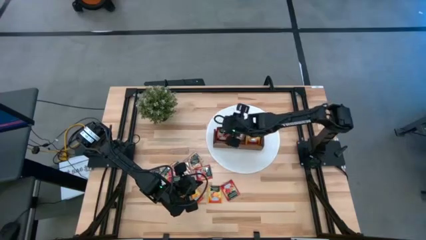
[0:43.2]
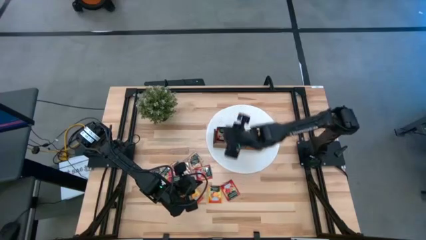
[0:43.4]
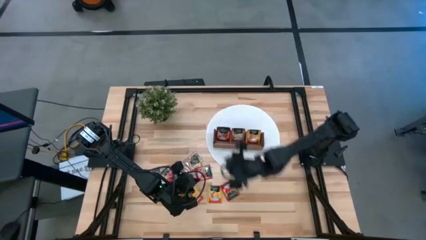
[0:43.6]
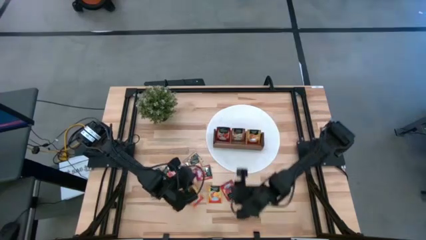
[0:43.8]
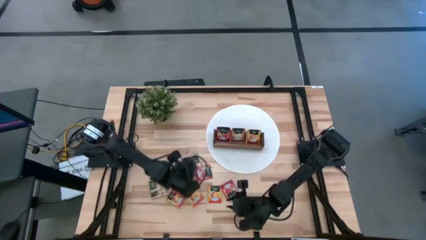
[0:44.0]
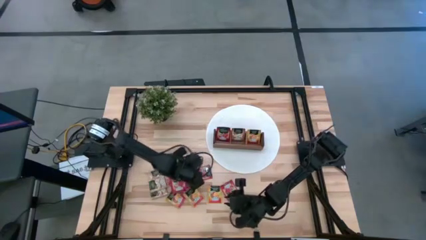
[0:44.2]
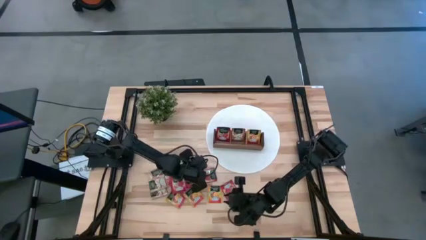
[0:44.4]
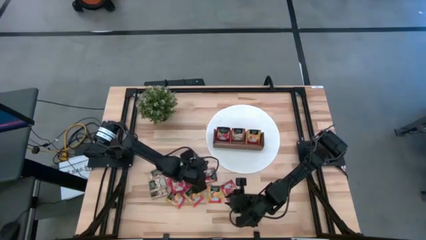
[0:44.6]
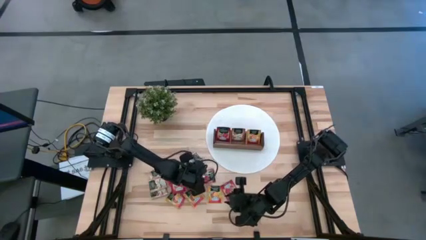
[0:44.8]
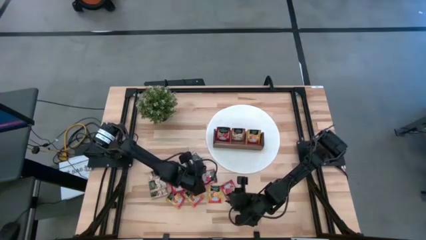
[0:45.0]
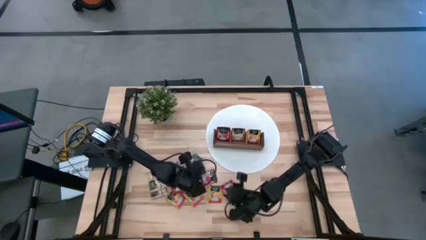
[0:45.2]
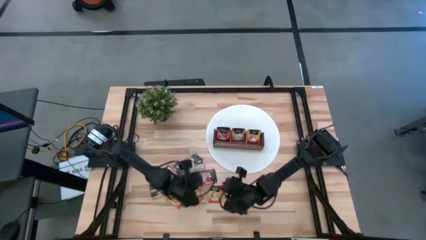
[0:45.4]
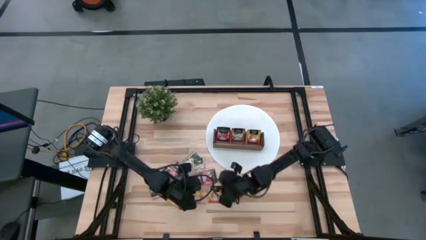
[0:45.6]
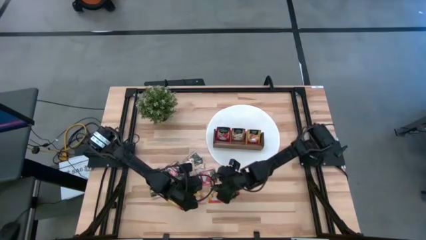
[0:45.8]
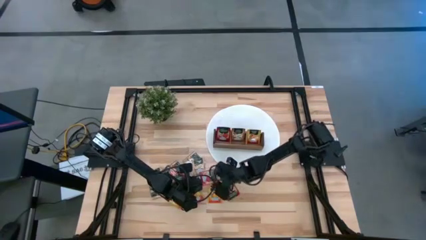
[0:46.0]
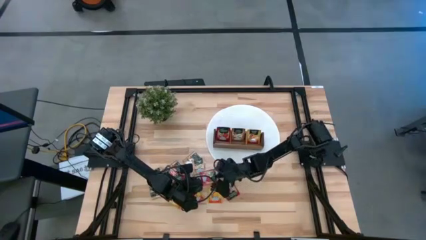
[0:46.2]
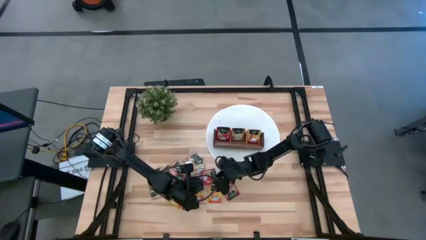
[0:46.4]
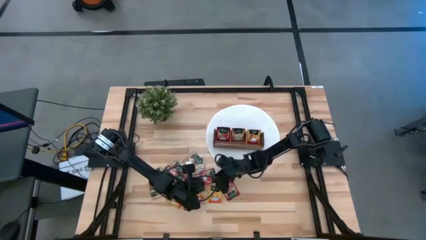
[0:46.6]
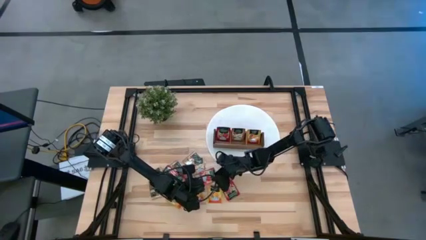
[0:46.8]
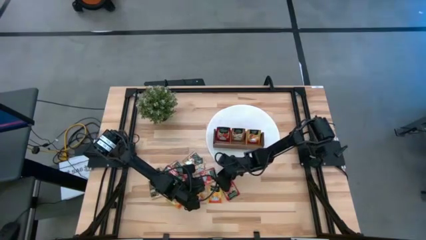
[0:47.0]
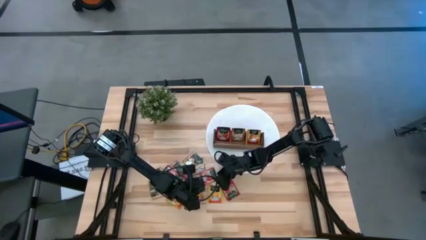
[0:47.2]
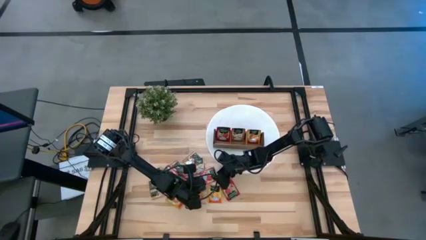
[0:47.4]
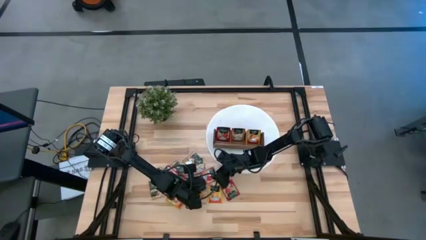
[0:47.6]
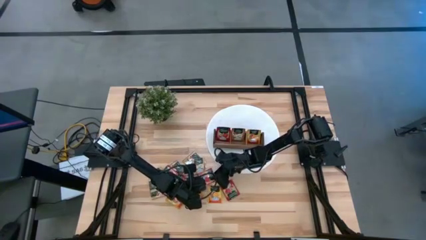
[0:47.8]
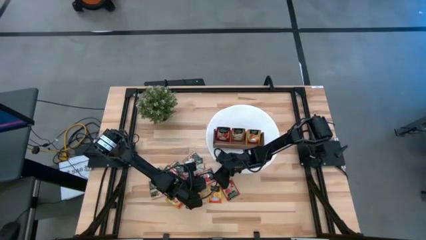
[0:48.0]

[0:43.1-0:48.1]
Task: Pick & Place Tea
Put the red tea bag into the left section of the wooden organizer

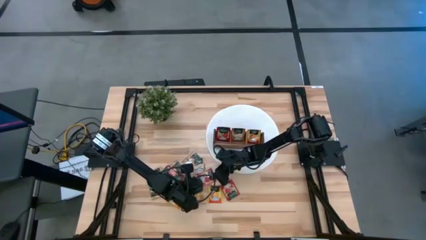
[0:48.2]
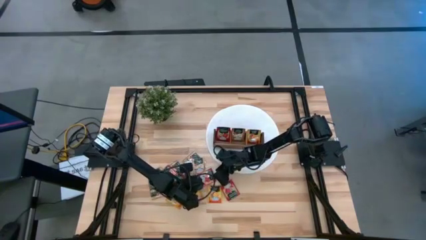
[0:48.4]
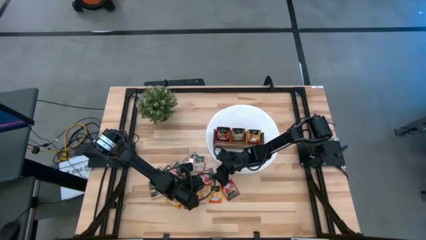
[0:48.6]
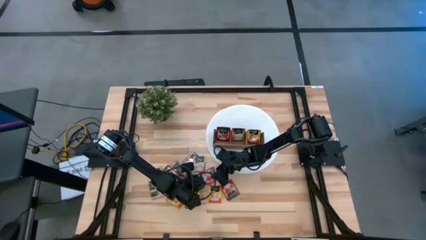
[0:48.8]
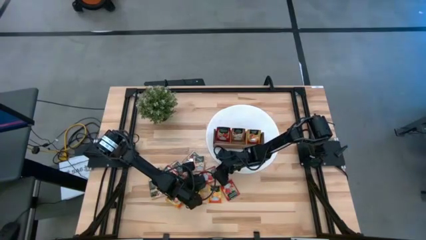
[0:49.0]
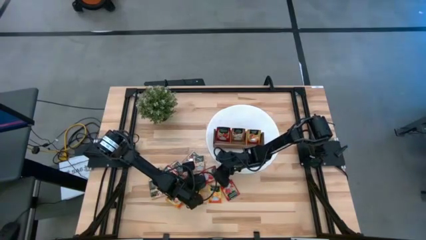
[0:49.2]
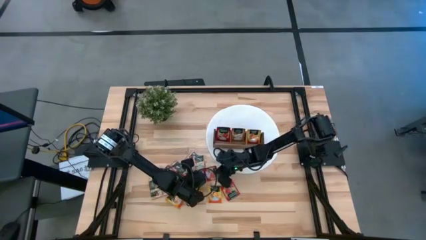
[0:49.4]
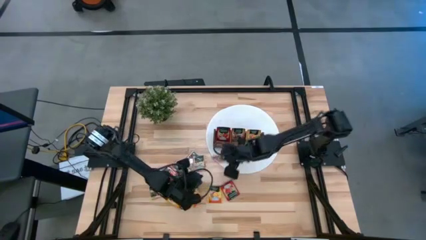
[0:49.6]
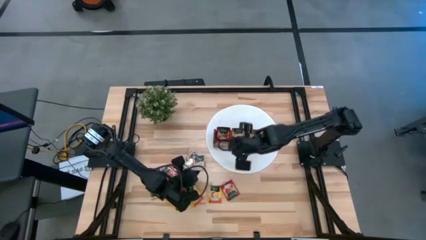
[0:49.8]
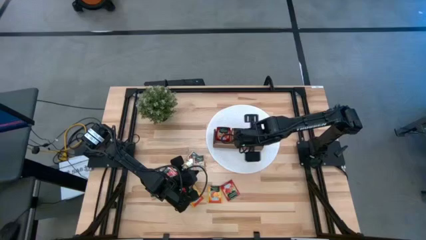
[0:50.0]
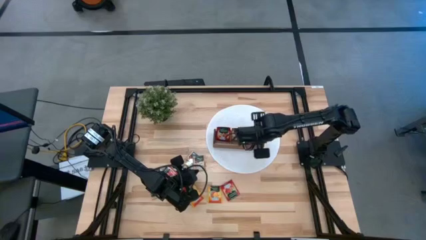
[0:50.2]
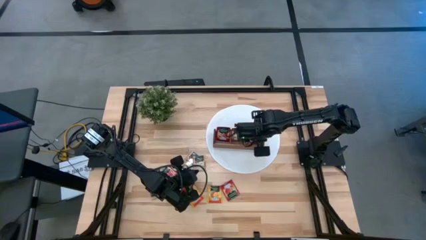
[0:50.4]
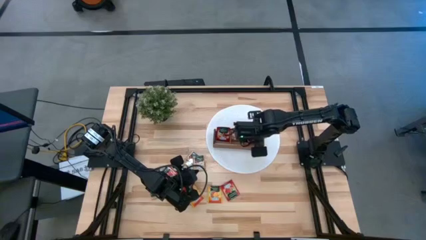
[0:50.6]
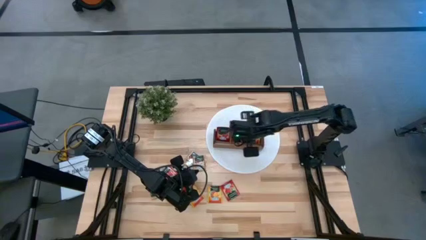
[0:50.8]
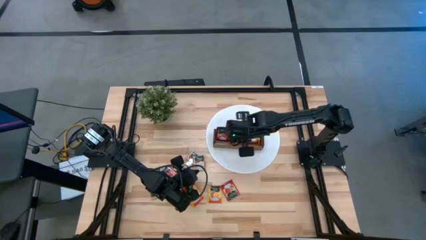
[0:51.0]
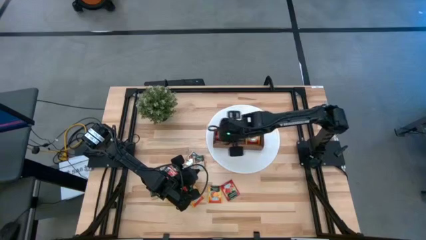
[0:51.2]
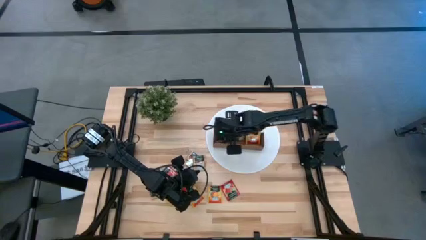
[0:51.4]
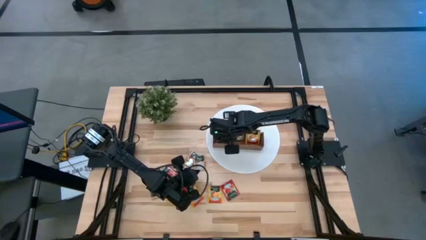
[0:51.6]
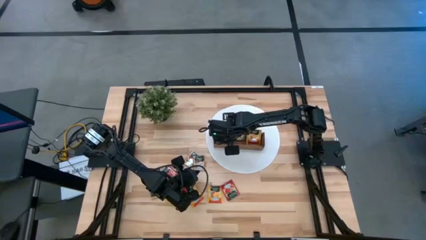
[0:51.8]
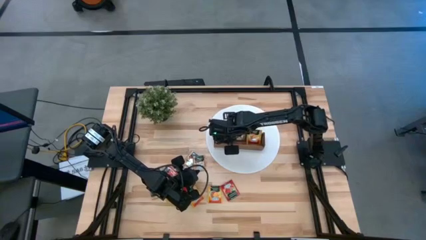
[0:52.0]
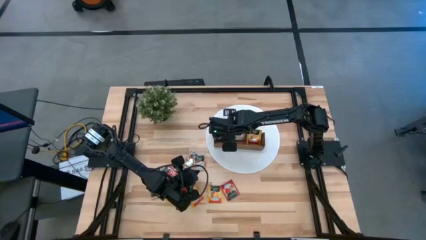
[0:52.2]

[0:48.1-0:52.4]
Put the red tea bag into the left section of the wooden organizer

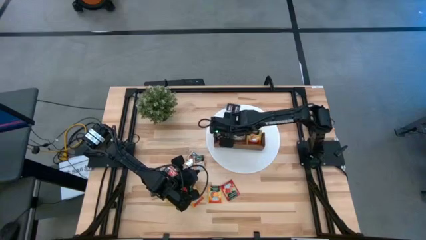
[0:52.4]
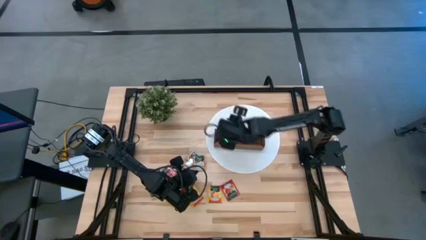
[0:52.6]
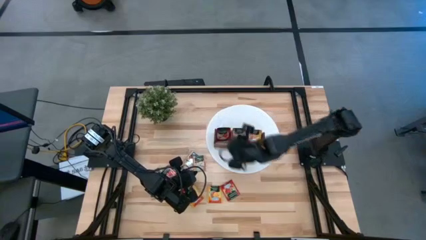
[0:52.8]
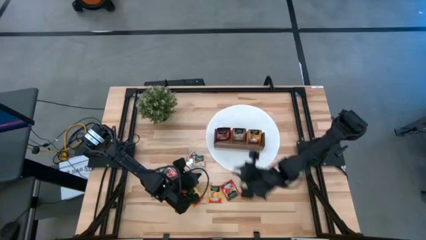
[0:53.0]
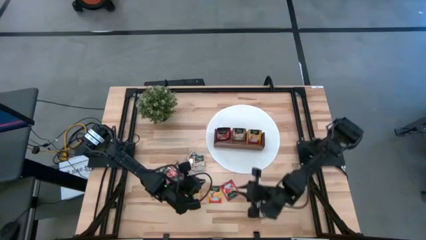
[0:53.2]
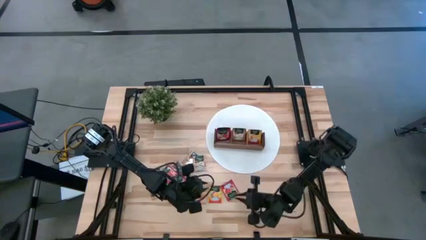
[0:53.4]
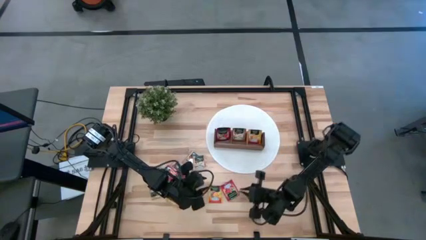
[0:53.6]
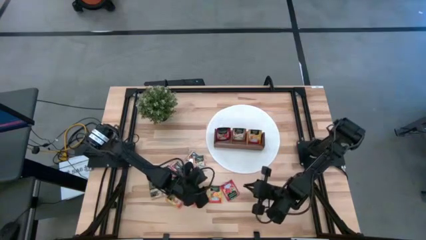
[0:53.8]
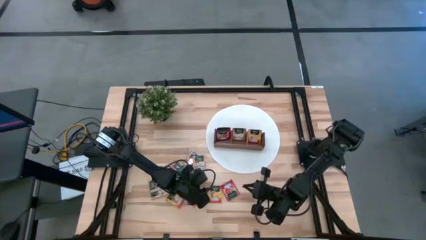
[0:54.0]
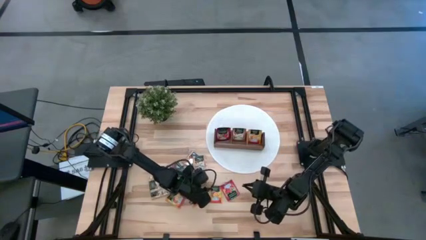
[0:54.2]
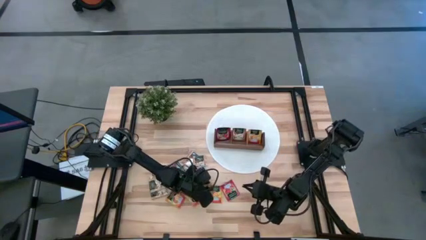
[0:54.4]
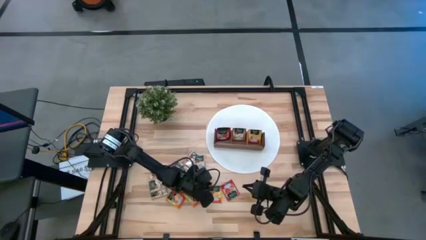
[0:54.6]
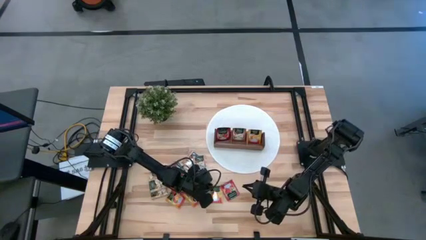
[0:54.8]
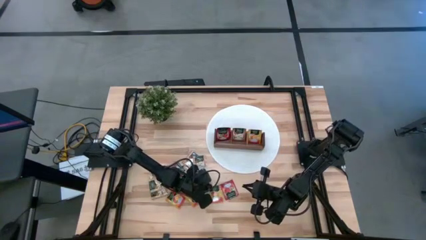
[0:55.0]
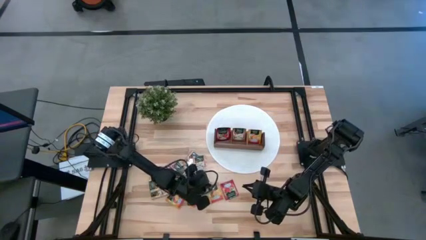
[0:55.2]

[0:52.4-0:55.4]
Put the yellow tea bag into the right section of the wooden organizer

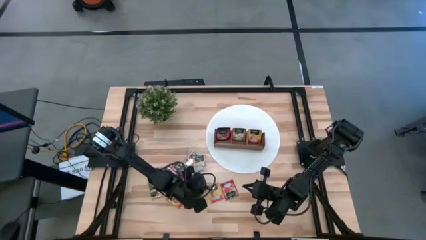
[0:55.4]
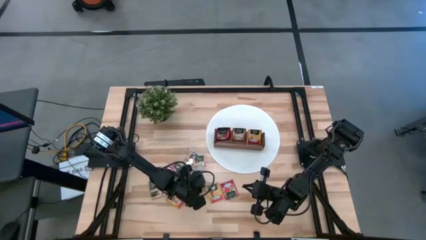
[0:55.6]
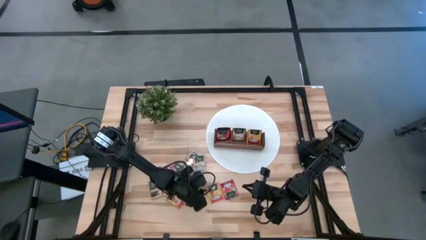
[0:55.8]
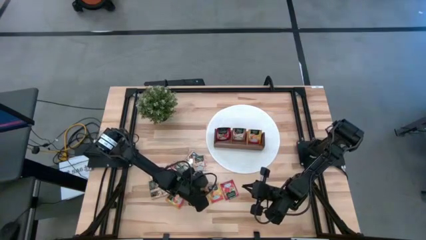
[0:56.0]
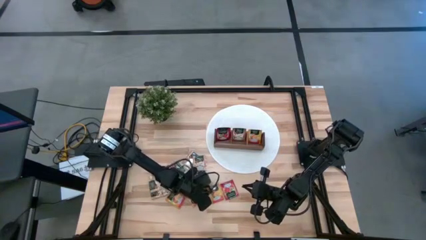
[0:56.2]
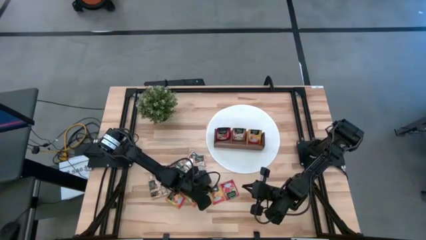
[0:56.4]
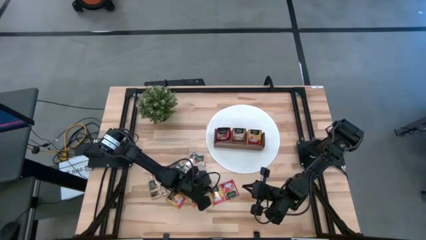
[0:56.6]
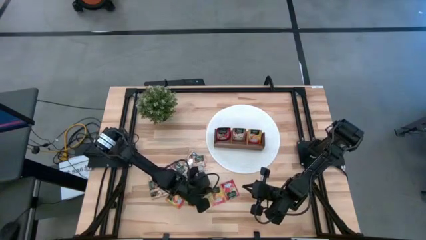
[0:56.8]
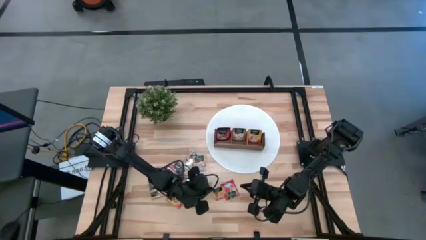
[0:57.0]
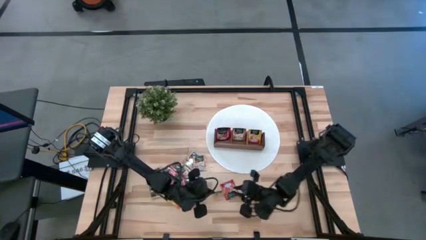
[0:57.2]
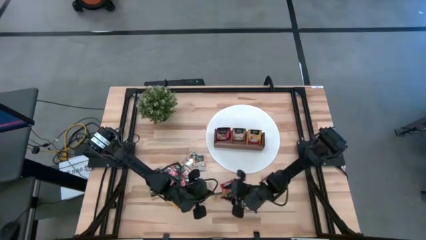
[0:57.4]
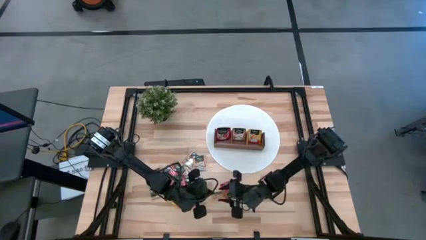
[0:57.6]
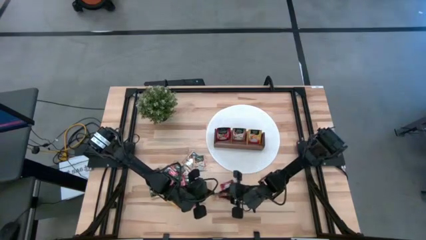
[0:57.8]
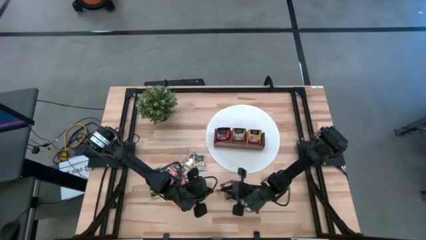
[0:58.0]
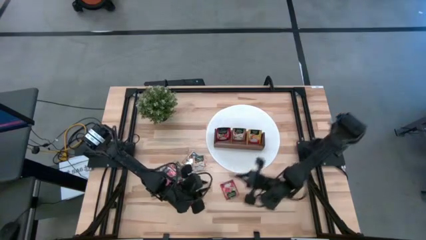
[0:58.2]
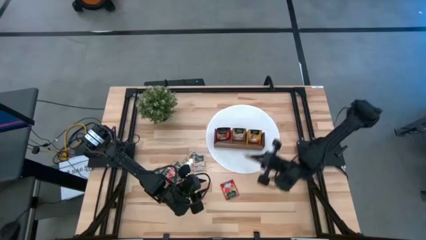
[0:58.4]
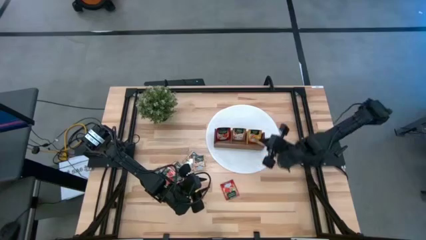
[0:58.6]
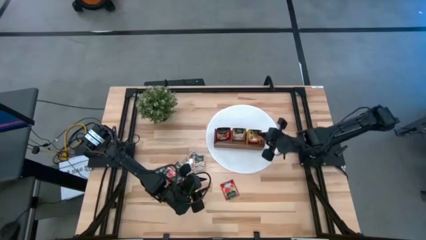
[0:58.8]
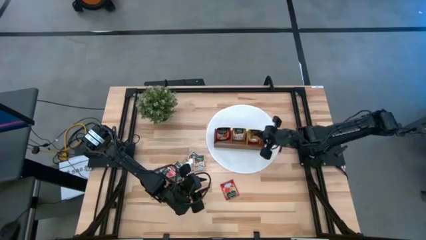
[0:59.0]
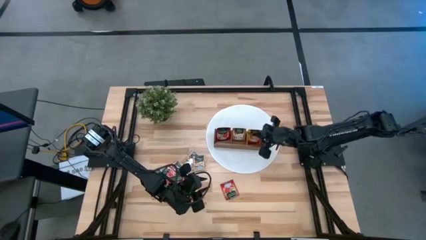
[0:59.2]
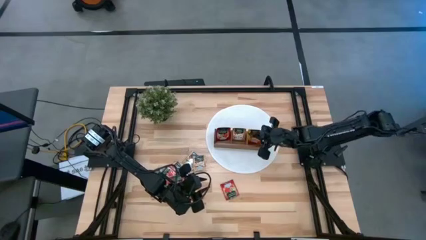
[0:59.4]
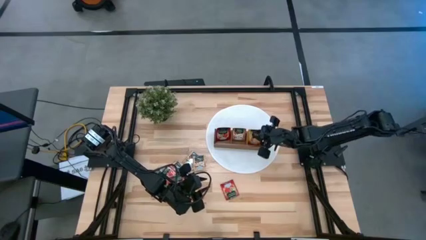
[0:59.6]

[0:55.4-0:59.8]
Put the yellow tea bag into the right section of the wooden organizer
